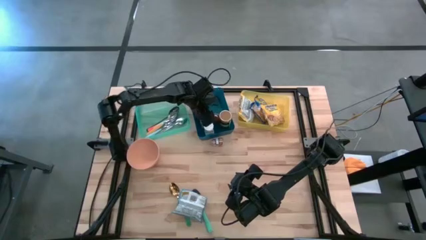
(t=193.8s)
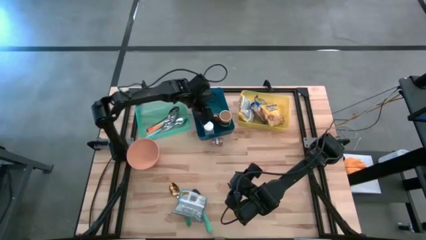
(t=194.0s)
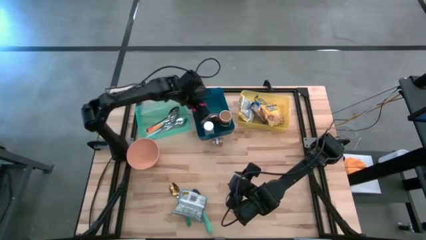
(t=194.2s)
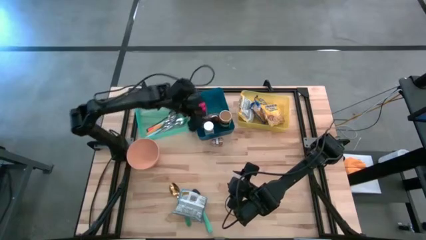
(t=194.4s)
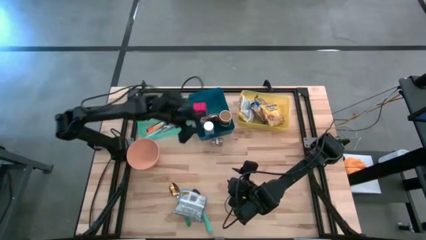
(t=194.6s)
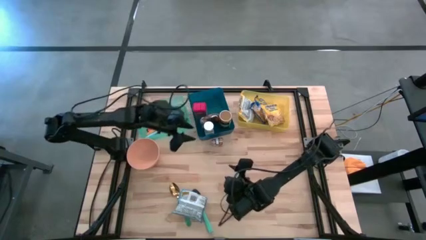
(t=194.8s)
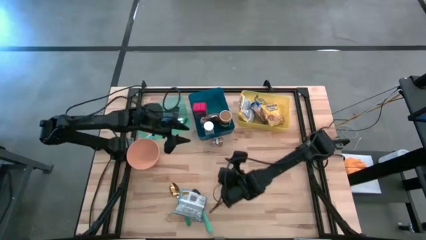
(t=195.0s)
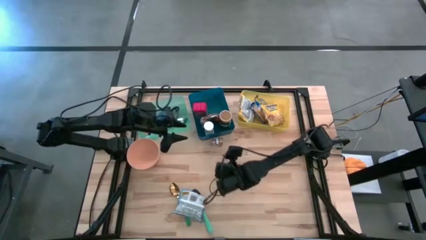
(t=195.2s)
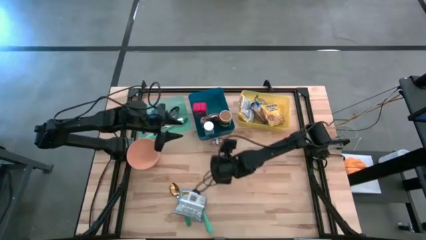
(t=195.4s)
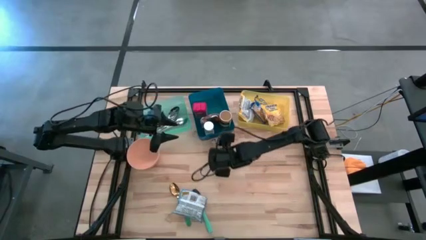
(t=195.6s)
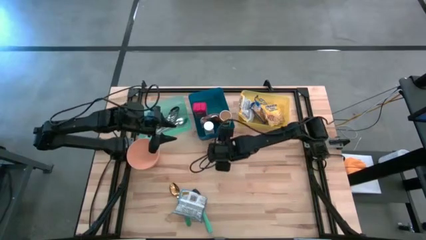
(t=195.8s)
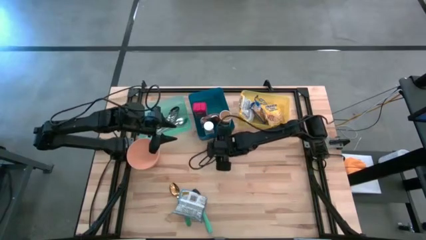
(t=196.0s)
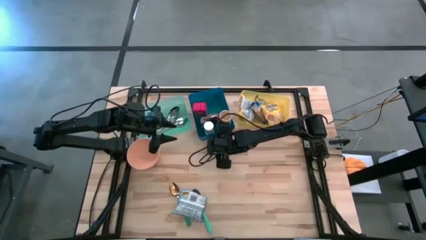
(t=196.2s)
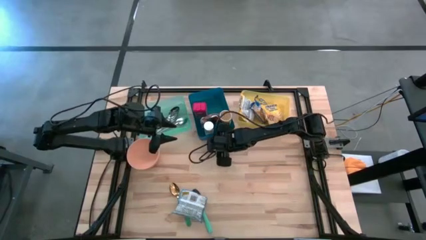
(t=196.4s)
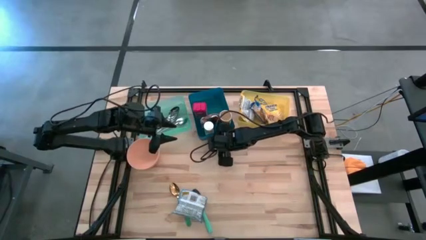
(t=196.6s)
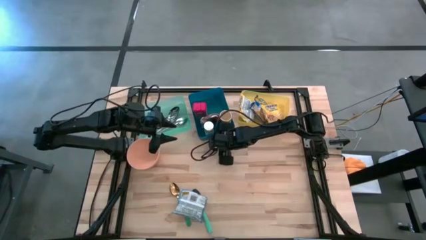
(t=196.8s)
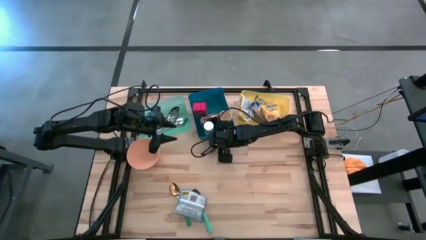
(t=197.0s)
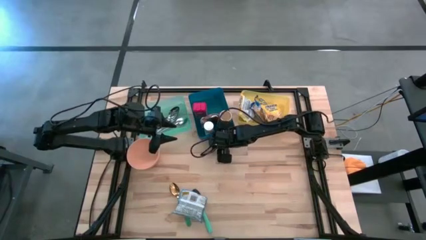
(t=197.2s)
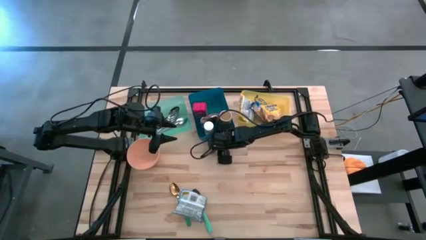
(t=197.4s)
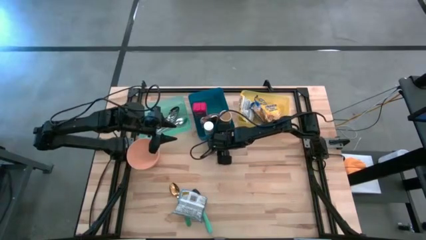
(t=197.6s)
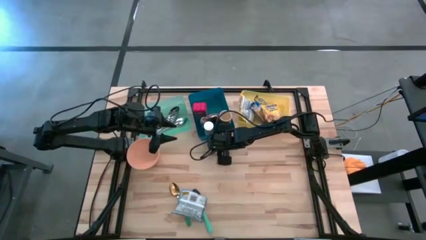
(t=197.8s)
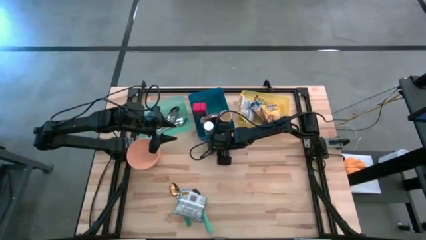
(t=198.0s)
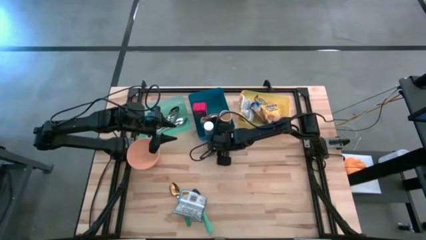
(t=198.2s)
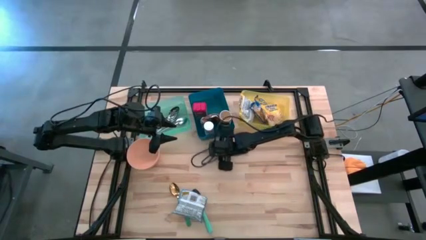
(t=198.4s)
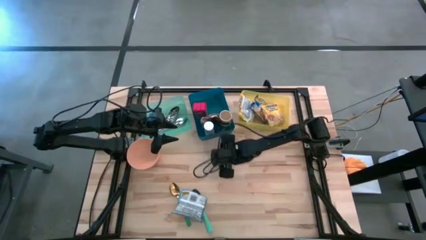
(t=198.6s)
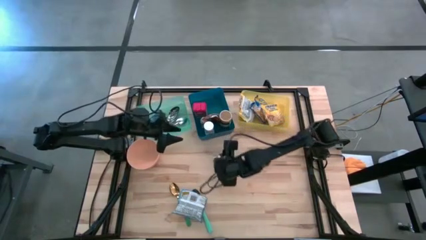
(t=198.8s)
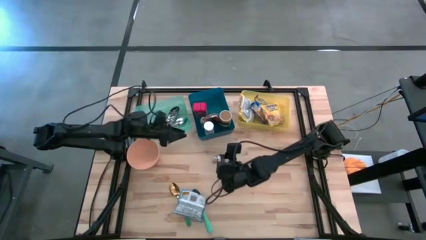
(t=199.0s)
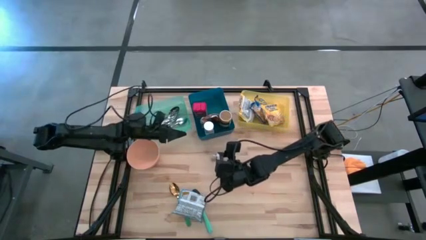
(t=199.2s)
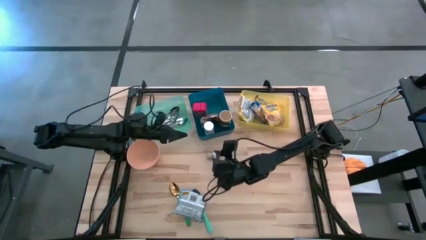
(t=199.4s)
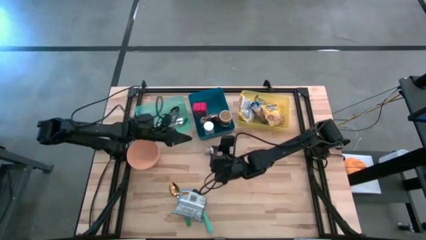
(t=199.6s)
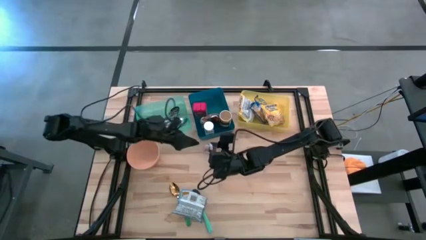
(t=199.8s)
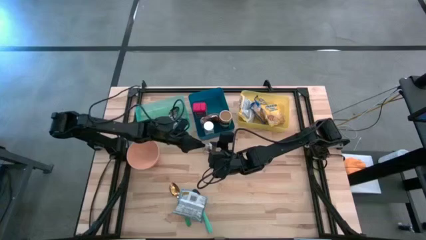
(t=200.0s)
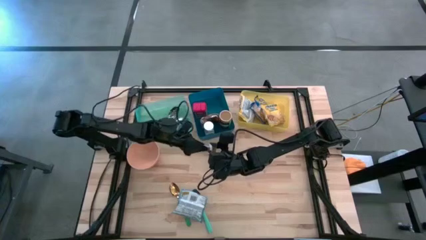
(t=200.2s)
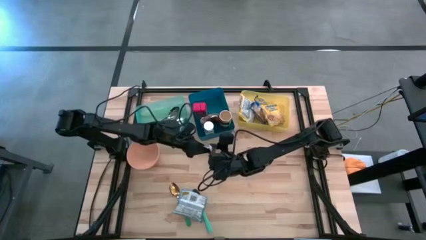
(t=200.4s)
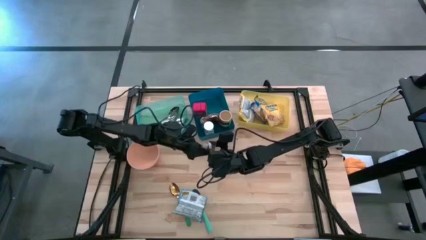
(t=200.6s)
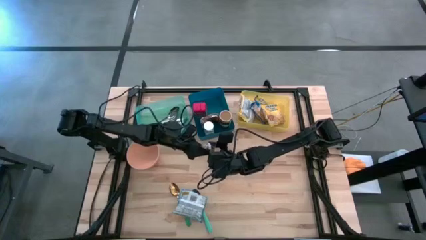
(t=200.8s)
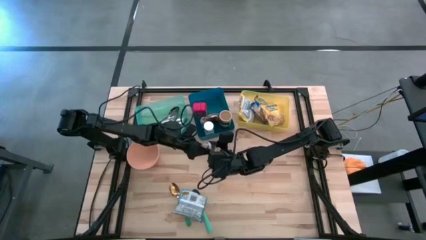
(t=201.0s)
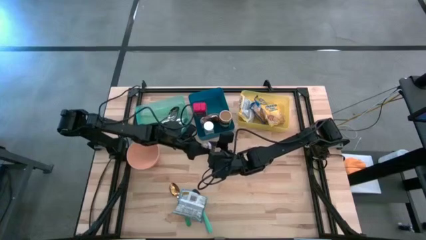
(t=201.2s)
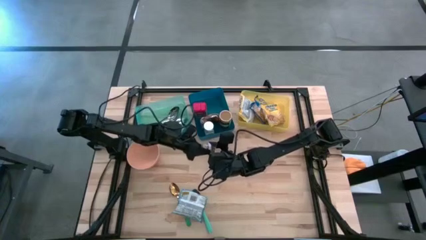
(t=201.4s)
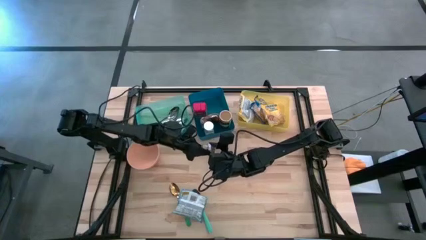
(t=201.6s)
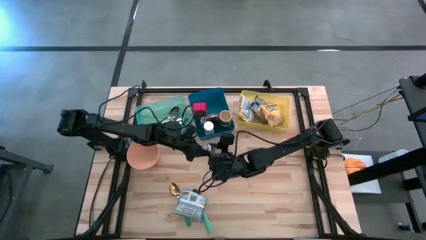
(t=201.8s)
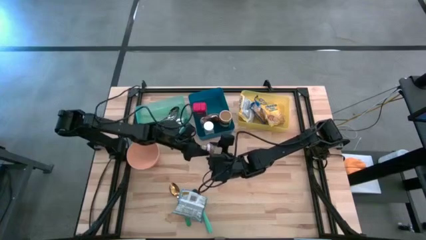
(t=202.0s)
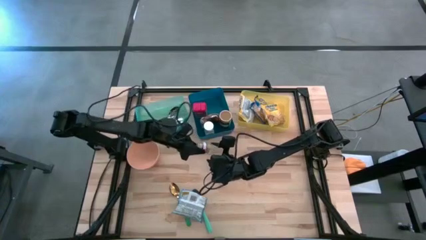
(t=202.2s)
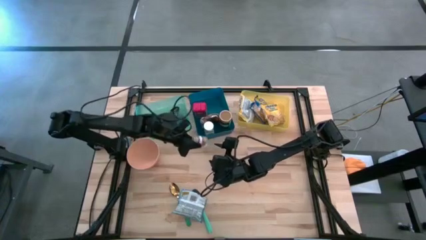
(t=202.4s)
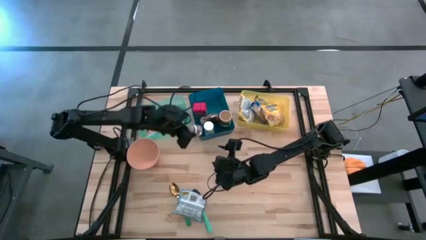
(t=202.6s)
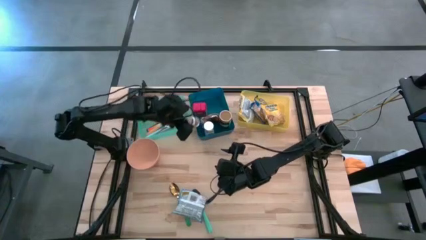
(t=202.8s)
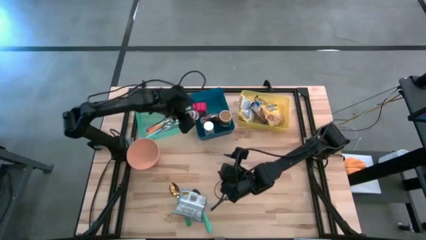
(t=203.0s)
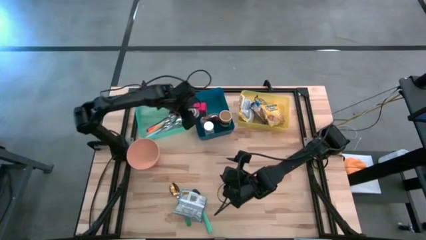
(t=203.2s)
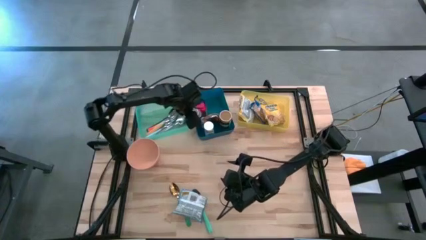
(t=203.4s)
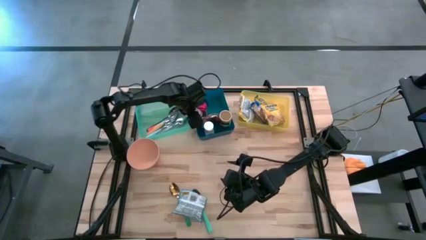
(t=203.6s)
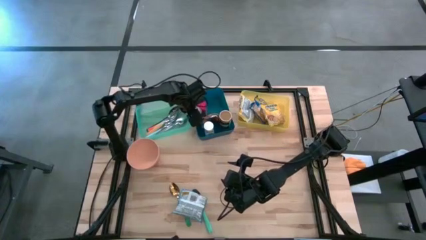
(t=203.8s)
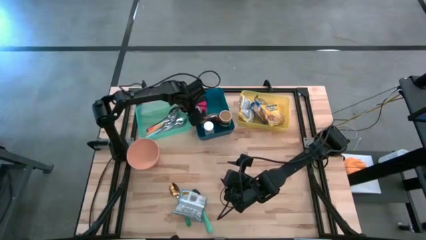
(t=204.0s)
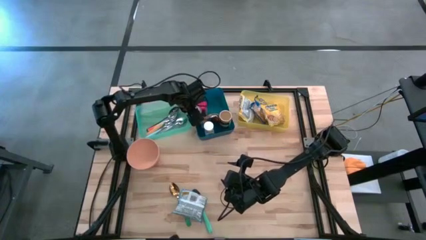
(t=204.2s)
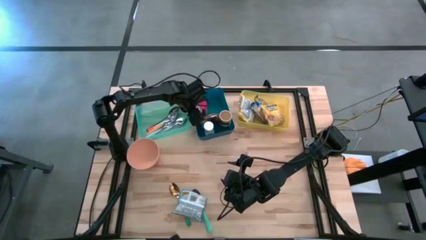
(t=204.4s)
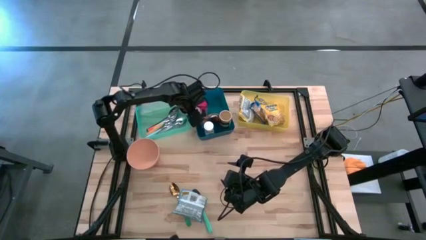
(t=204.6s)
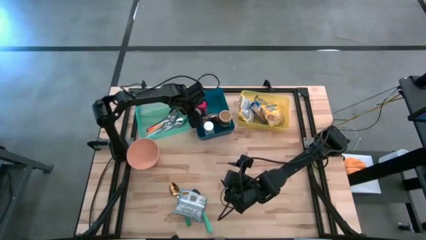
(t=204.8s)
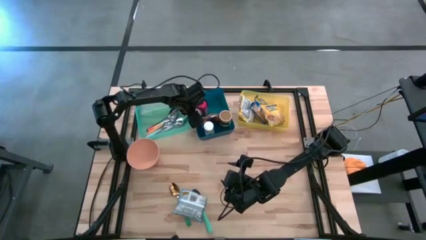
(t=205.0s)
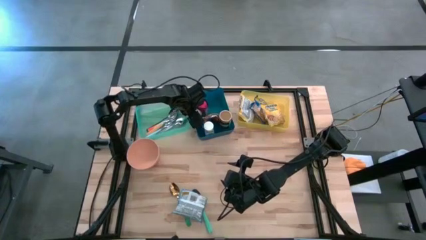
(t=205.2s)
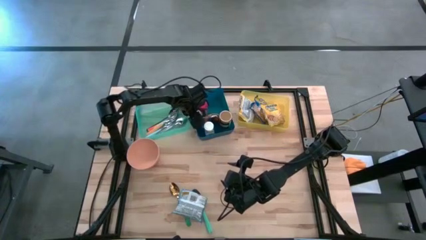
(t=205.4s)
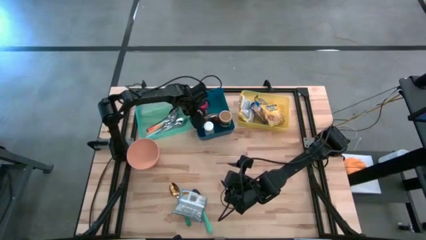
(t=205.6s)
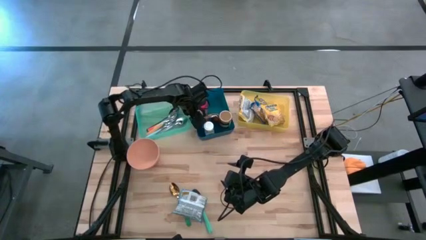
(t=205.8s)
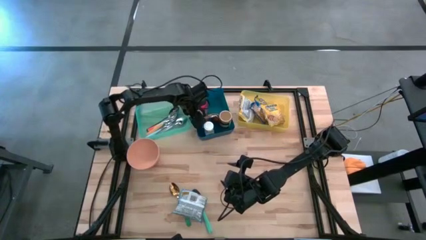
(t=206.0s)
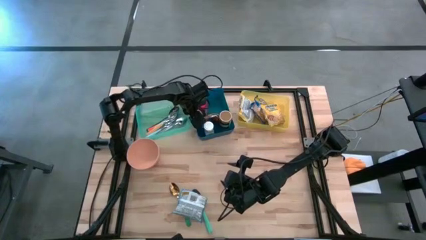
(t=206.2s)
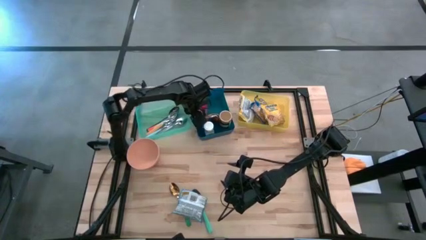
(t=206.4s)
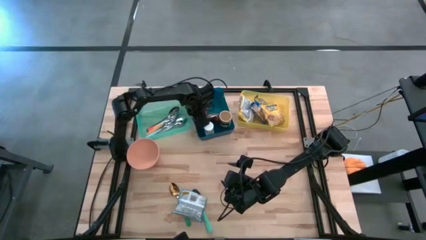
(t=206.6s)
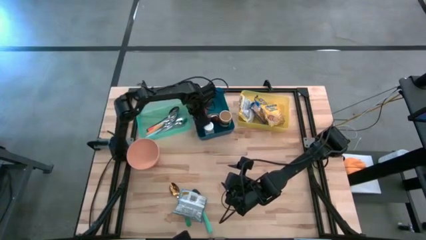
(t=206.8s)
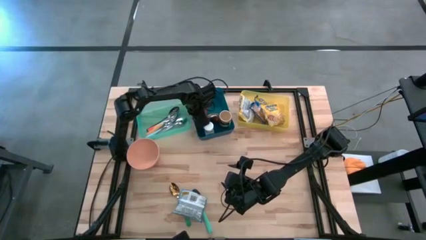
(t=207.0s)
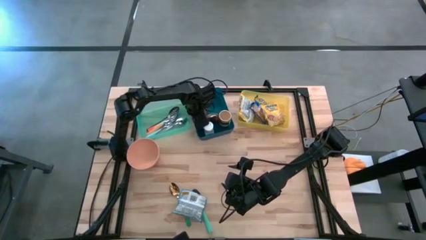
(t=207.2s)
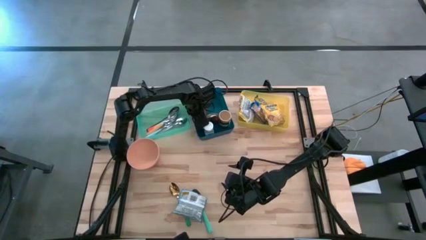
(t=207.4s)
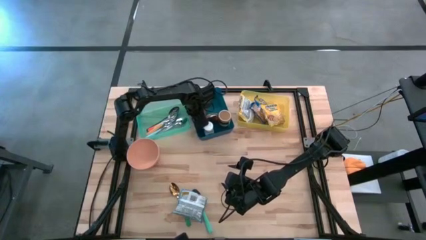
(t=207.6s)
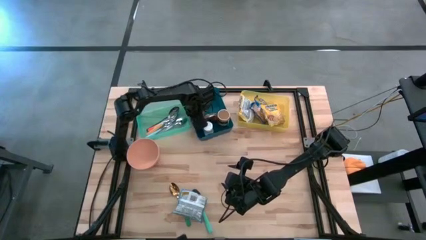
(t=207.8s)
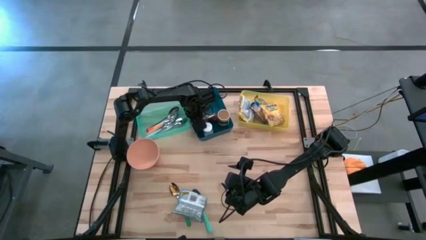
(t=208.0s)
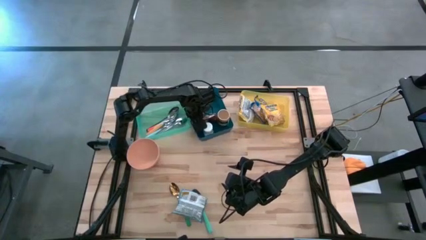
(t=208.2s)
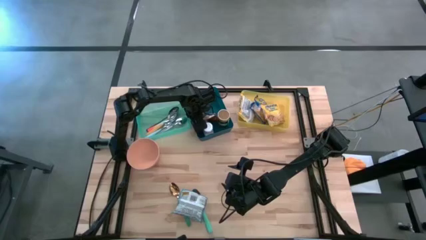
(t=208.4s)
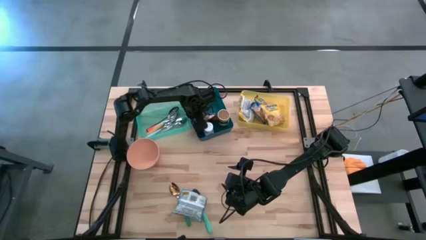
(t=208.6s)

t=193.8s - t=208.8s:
Put the brown seasoning bottle into the blue bin
